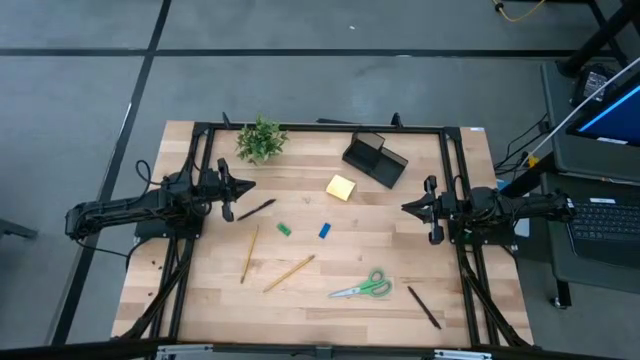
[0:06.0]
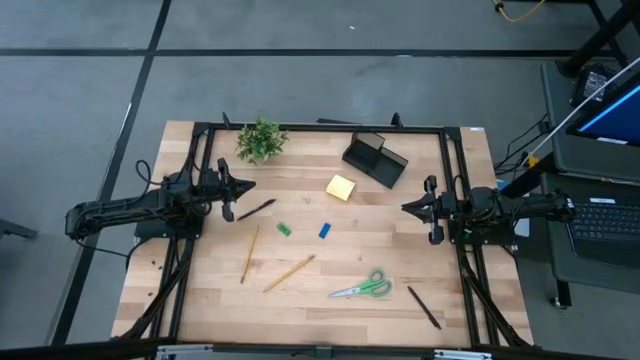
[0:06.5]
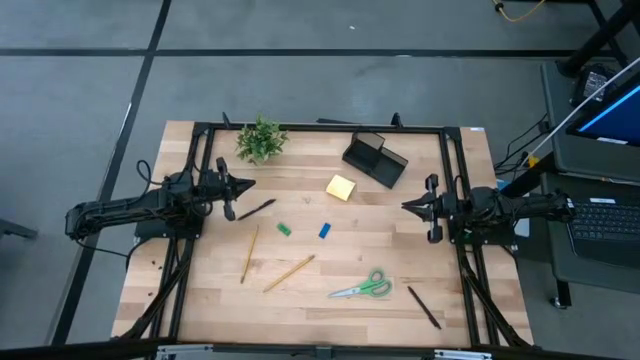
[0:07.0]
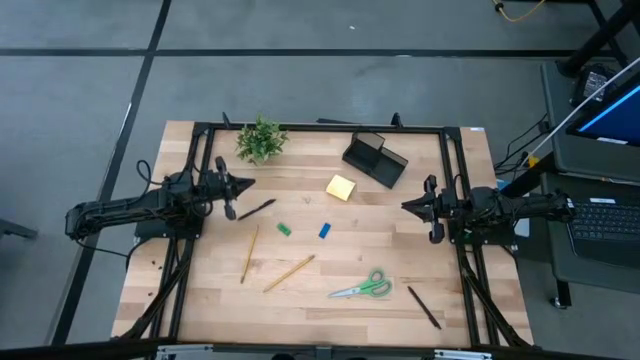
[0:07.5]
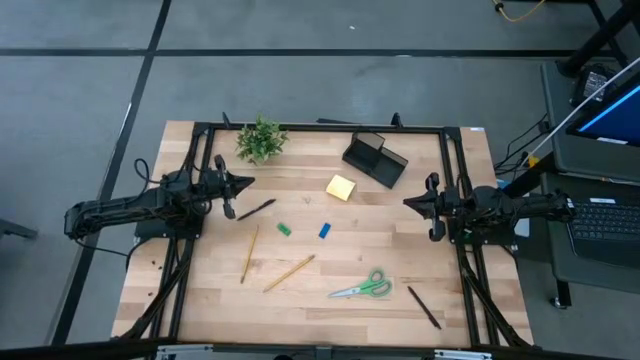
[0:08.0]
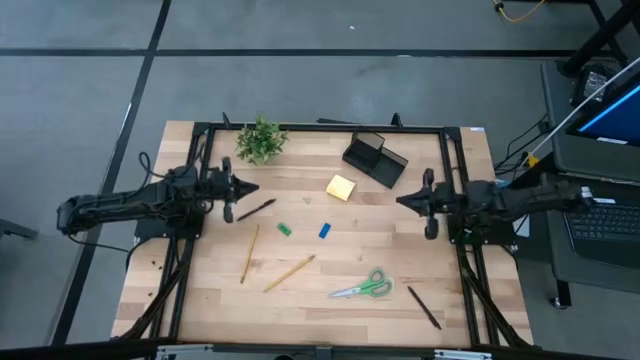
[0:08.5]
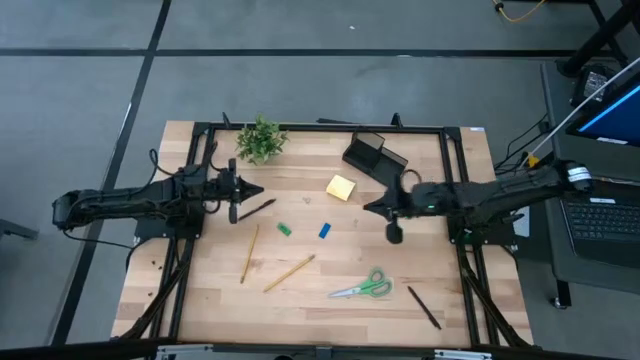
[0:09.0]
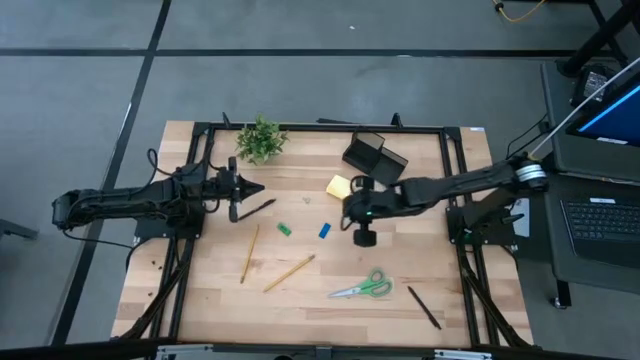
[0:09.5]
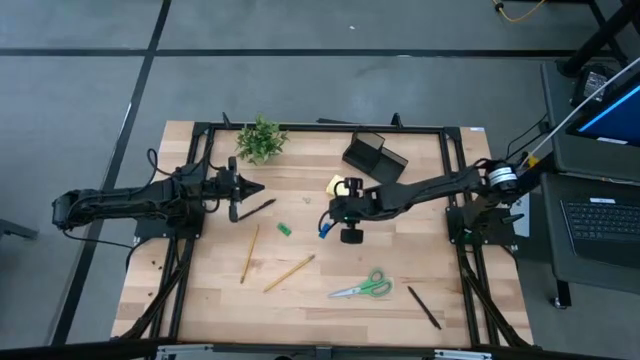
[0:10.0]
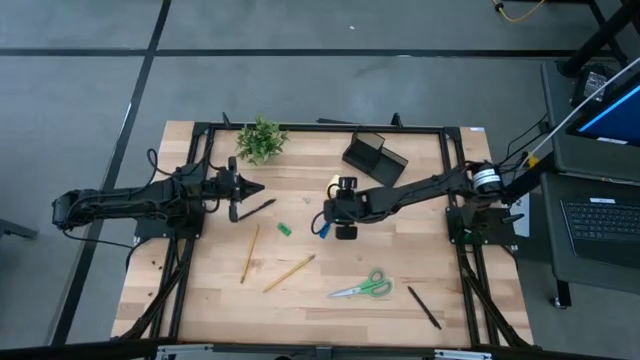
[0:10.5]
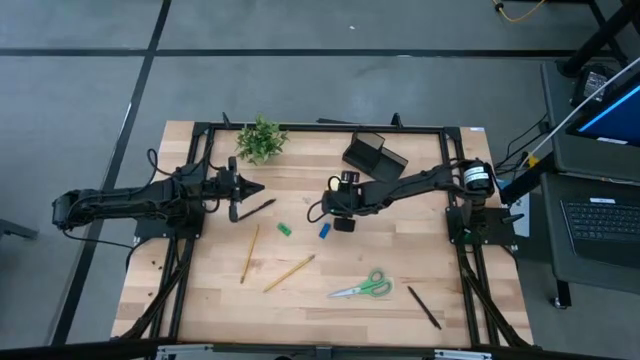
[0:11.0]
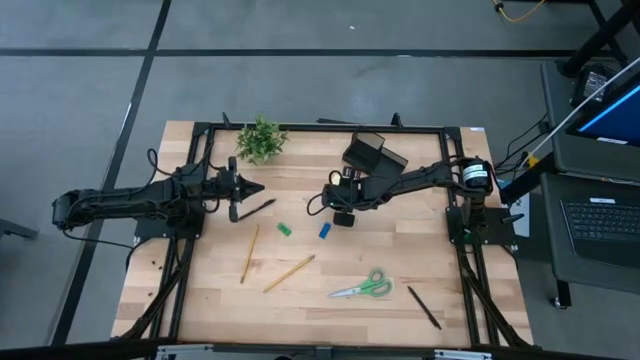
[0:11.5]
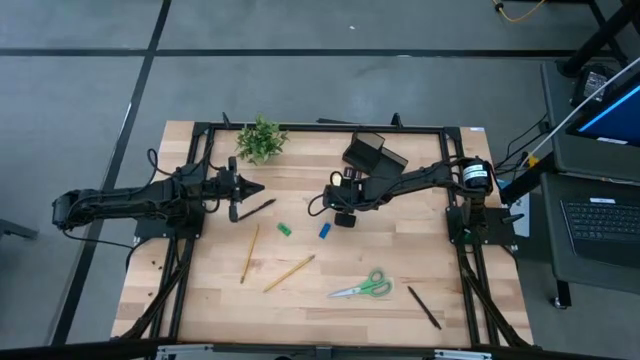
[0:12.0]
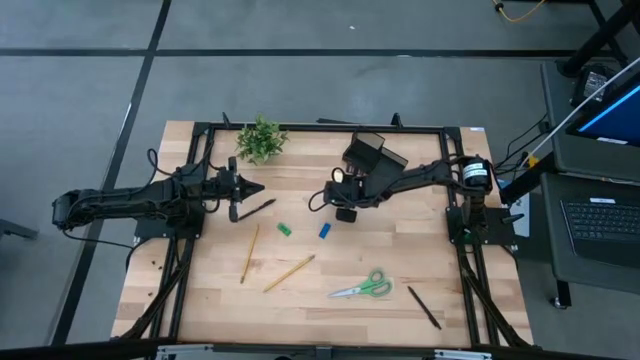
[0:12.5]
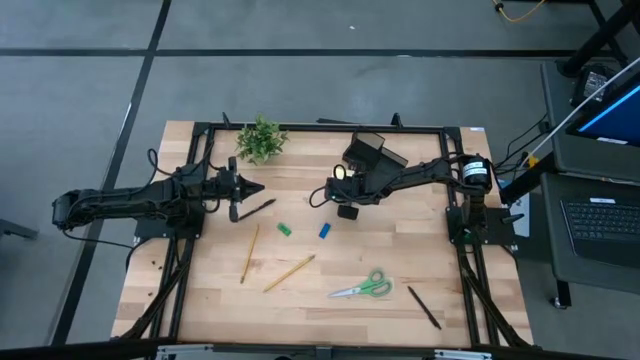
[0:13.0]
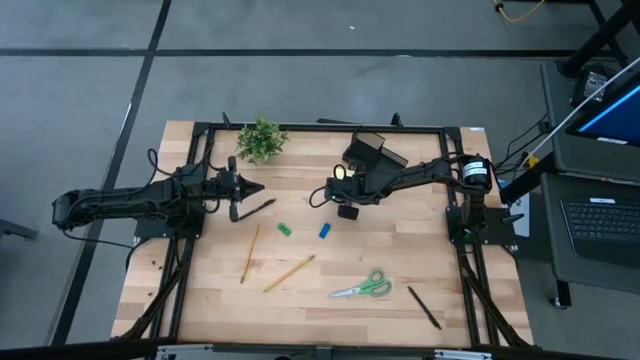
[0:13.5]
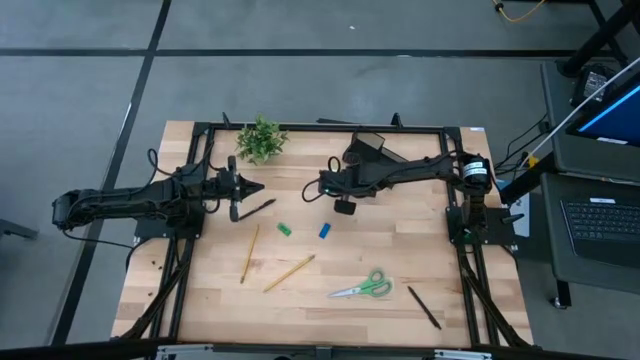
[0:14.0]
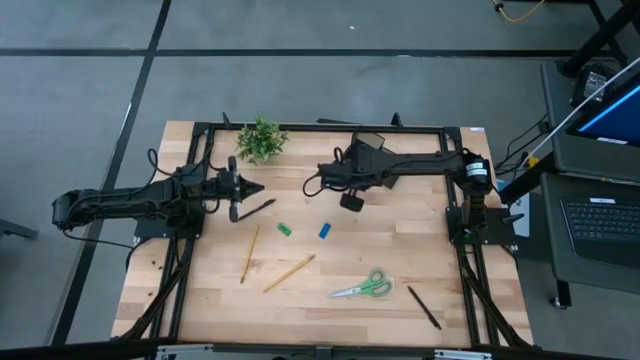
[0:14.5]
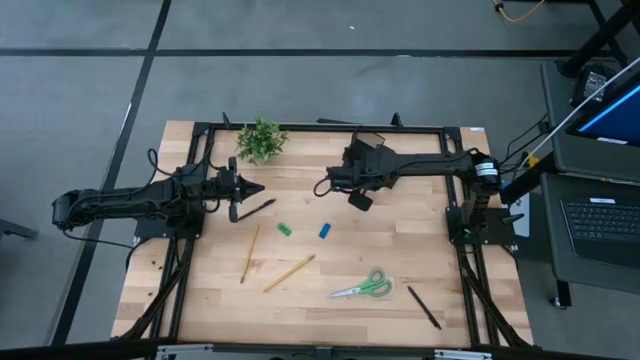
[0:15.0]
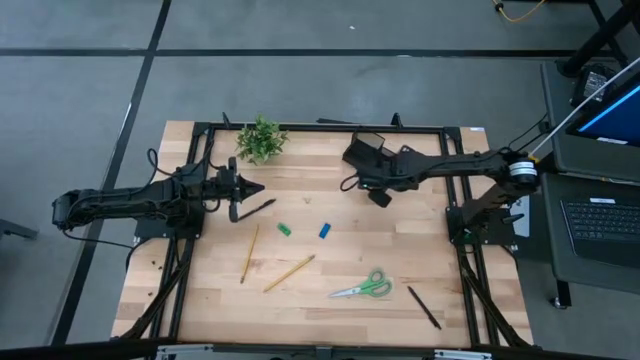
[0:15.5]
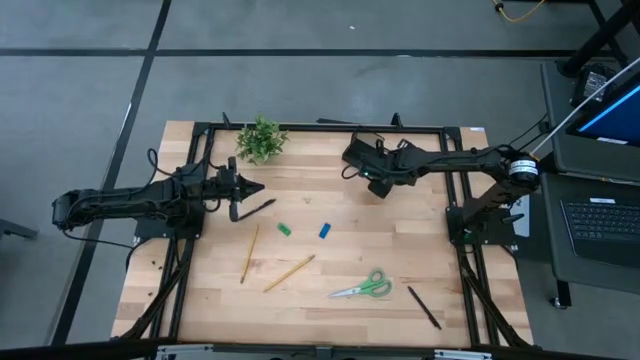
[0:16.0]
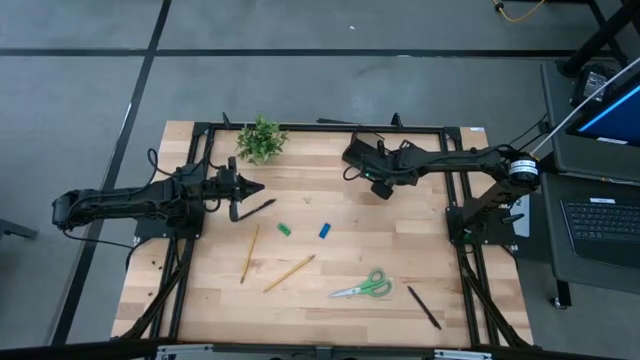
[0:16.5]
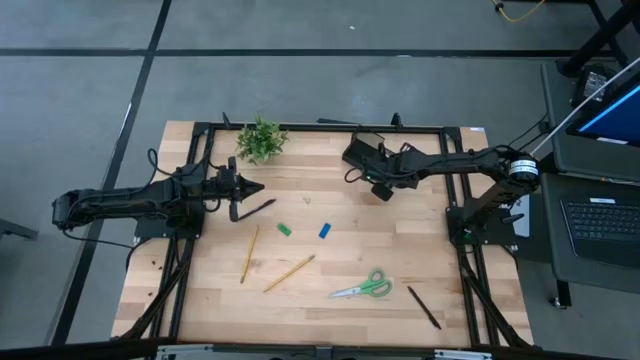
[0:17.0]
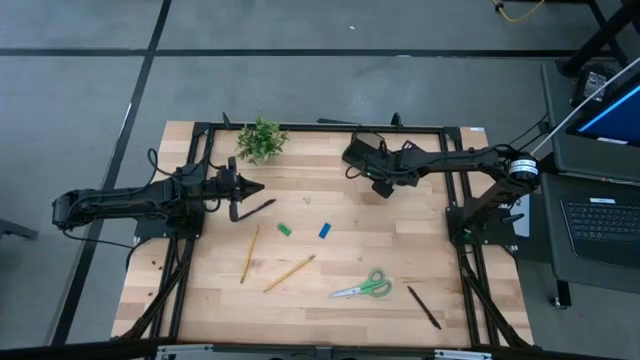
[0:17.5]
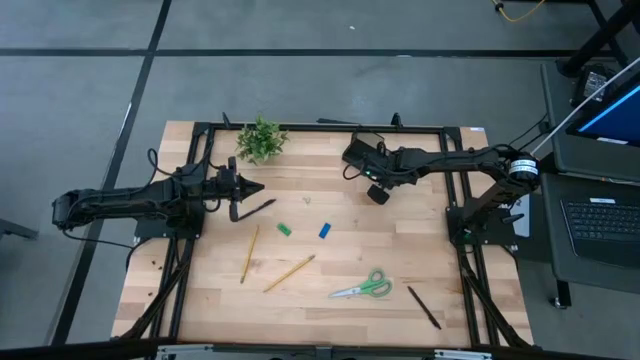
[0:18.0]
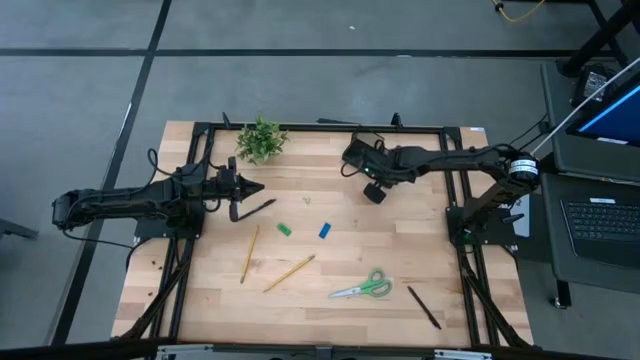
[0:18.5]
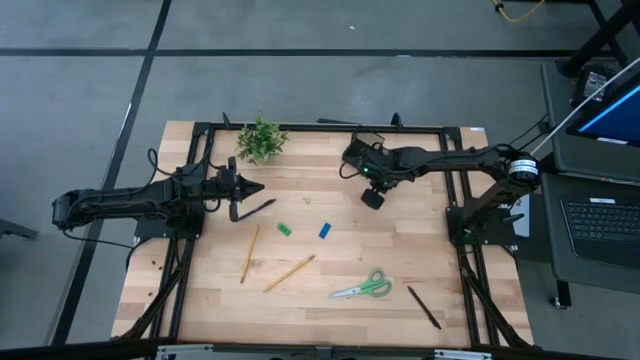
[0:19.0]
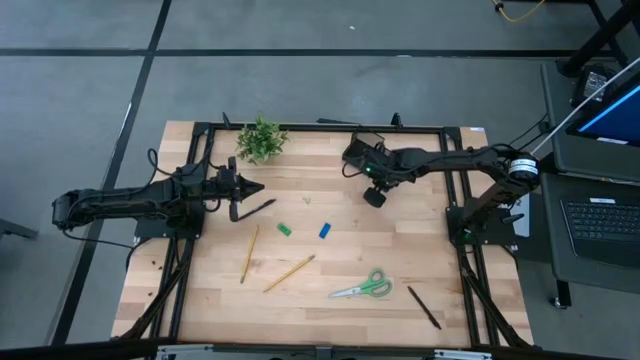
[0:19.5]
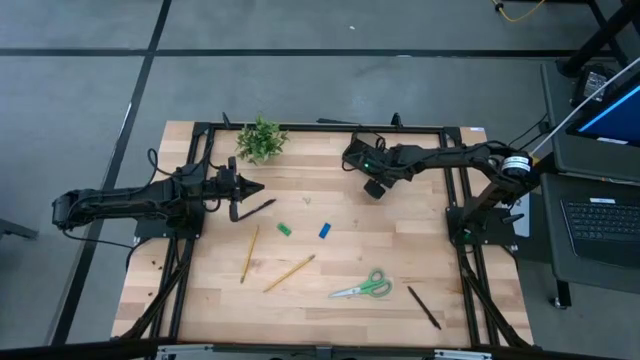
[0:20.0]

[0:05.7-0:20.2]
Task: Pick and place office supplies into organizer
Put the yellow sticky notes into the black desk organizer
